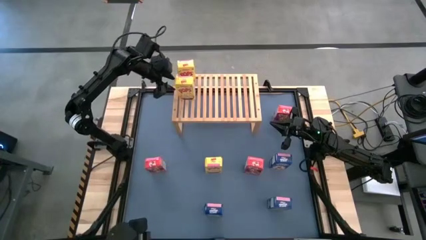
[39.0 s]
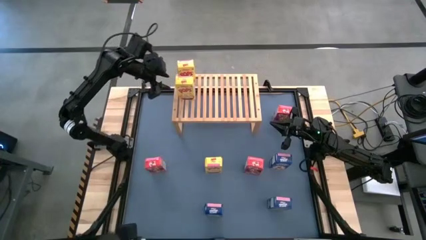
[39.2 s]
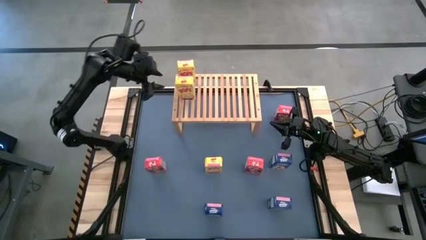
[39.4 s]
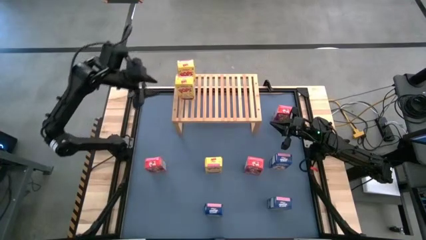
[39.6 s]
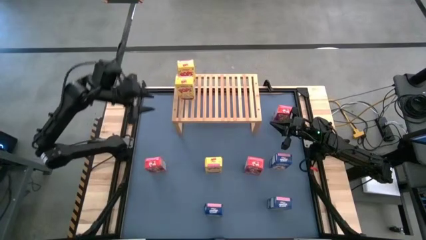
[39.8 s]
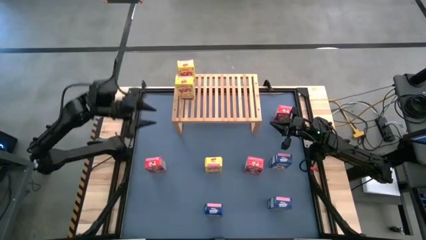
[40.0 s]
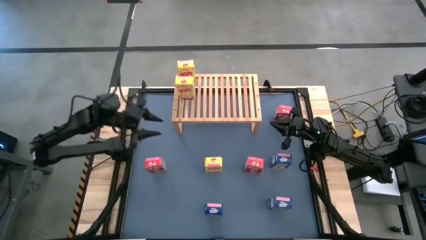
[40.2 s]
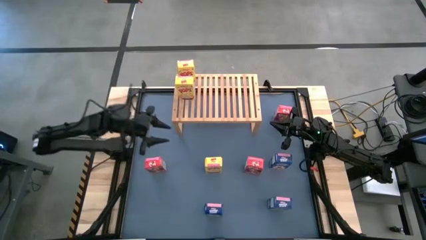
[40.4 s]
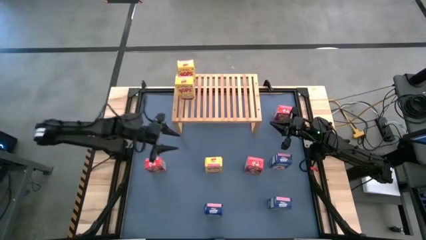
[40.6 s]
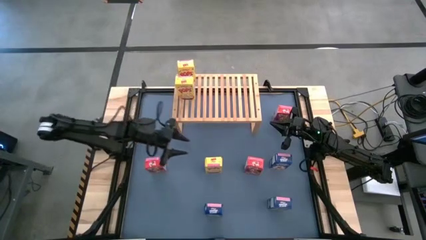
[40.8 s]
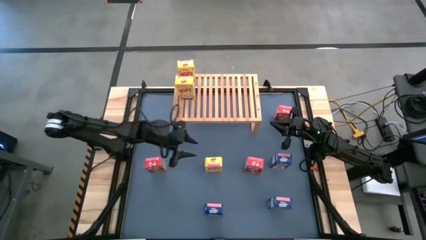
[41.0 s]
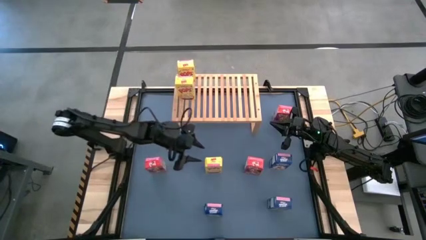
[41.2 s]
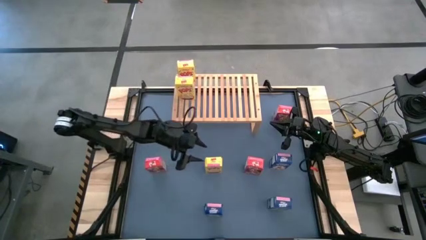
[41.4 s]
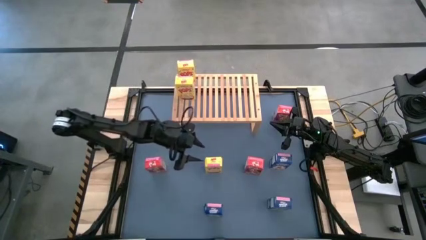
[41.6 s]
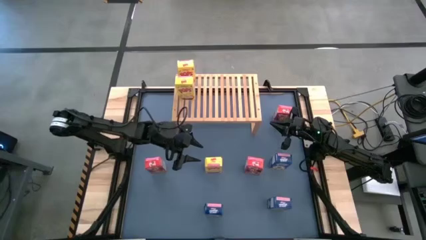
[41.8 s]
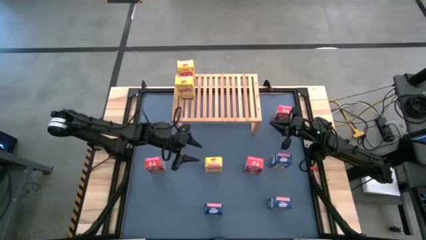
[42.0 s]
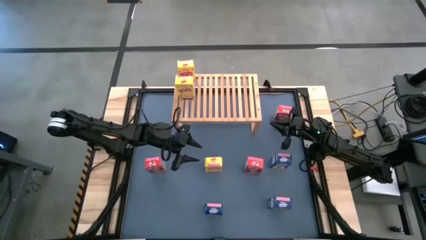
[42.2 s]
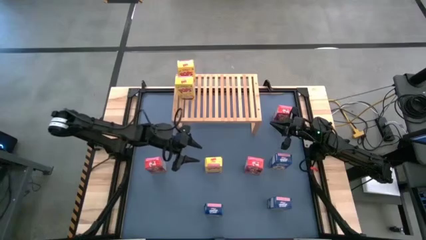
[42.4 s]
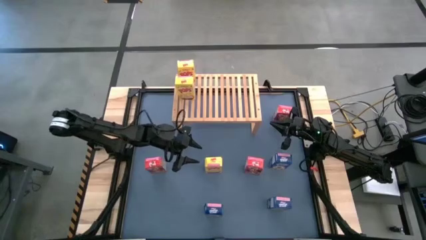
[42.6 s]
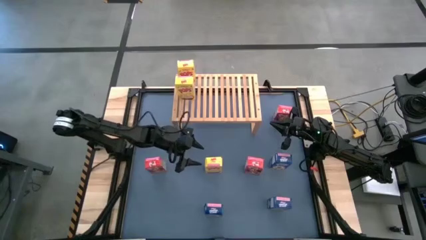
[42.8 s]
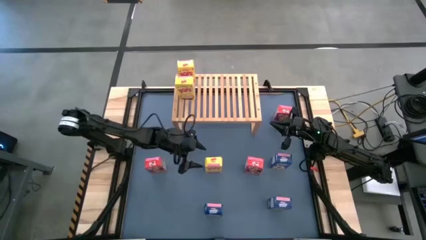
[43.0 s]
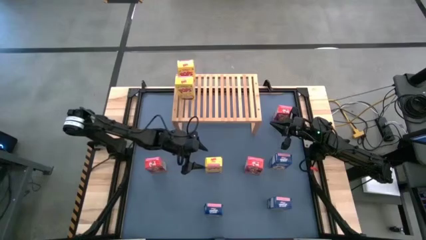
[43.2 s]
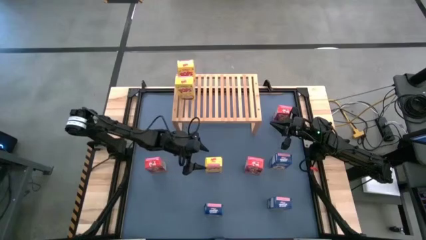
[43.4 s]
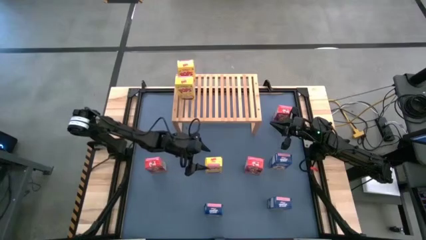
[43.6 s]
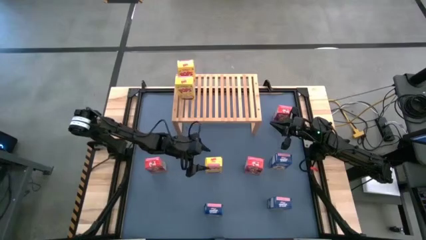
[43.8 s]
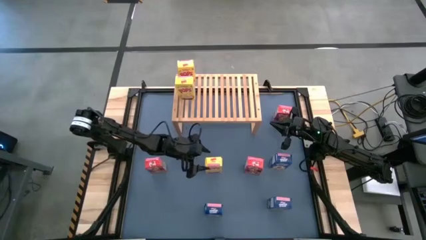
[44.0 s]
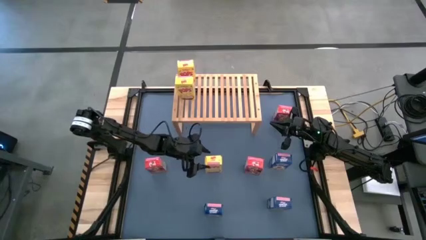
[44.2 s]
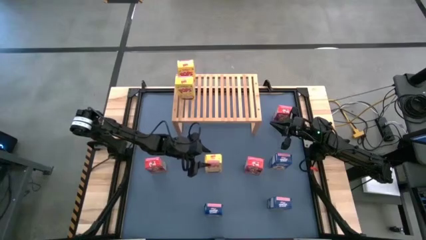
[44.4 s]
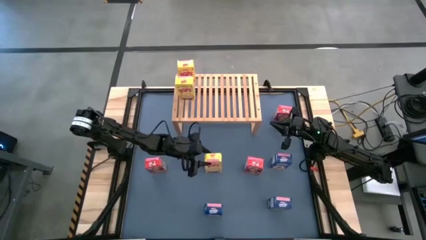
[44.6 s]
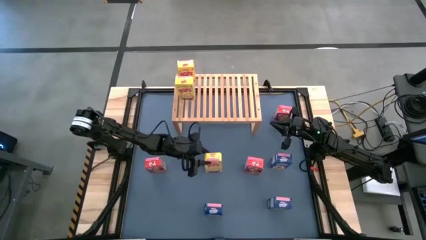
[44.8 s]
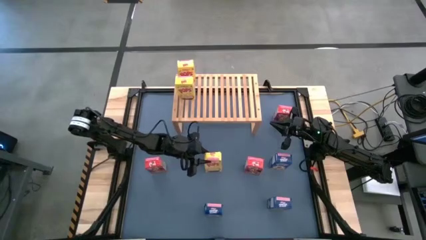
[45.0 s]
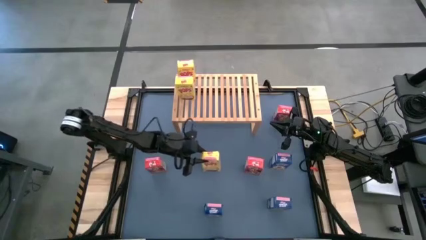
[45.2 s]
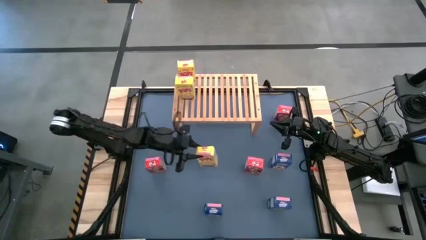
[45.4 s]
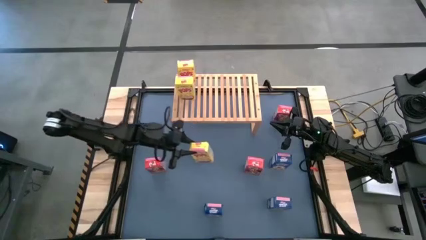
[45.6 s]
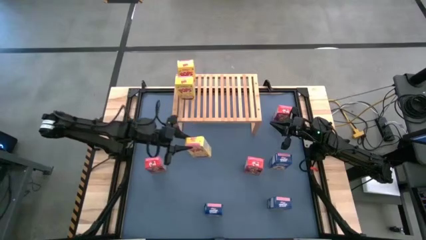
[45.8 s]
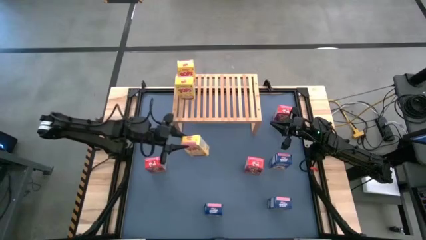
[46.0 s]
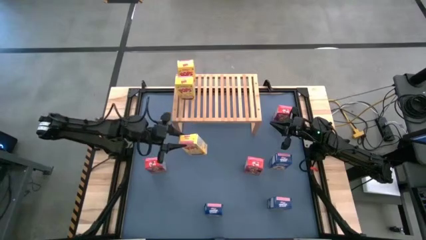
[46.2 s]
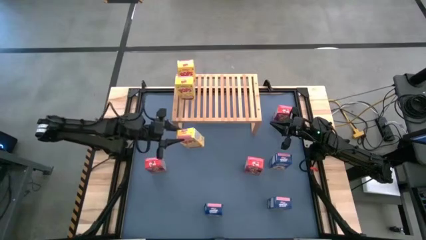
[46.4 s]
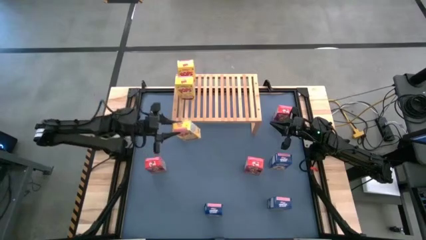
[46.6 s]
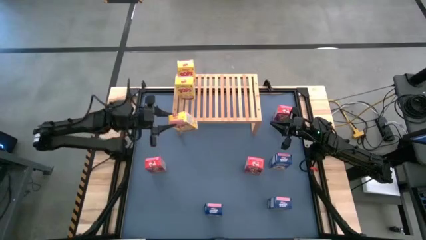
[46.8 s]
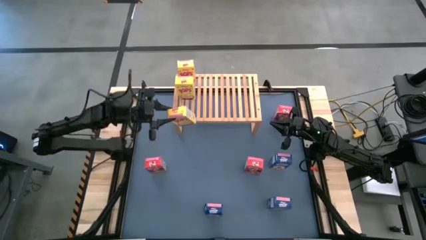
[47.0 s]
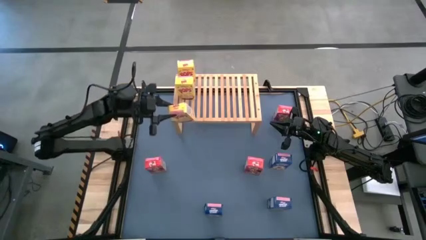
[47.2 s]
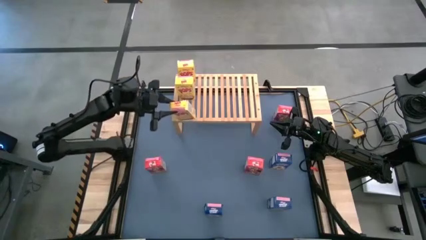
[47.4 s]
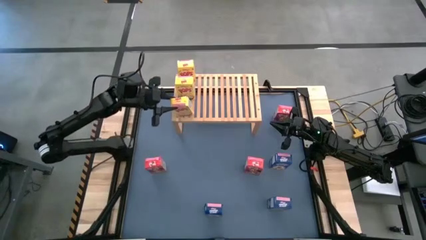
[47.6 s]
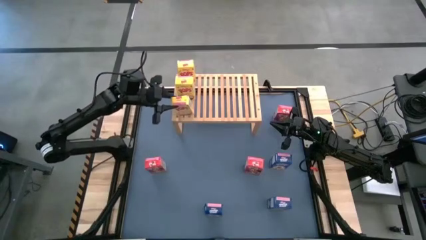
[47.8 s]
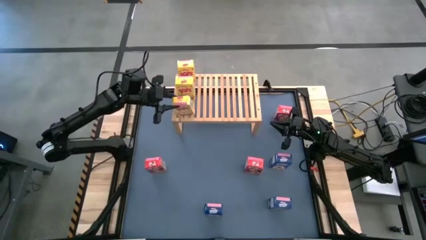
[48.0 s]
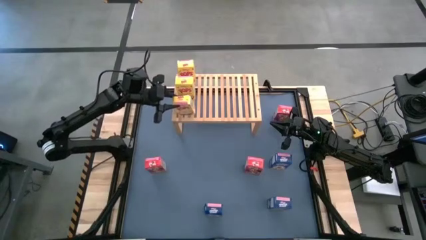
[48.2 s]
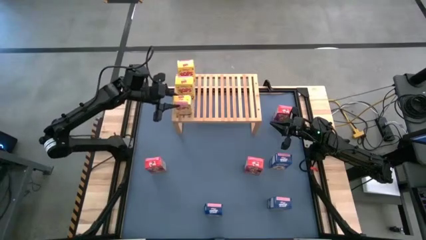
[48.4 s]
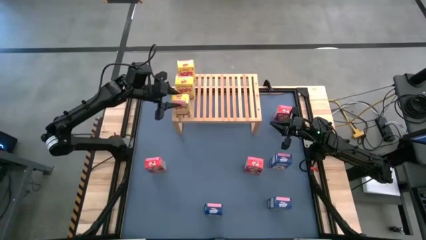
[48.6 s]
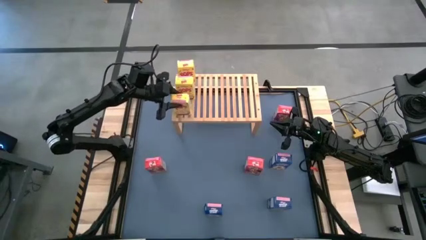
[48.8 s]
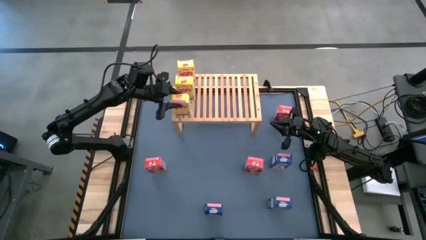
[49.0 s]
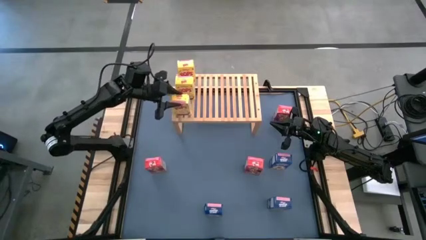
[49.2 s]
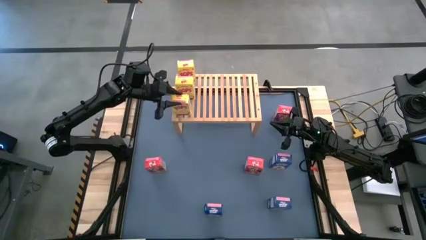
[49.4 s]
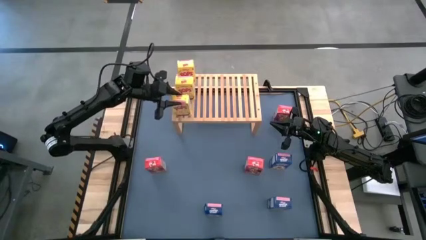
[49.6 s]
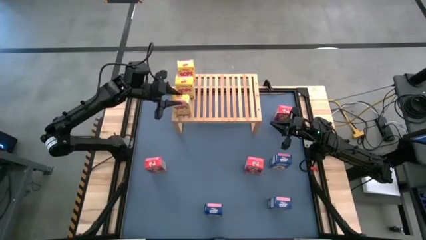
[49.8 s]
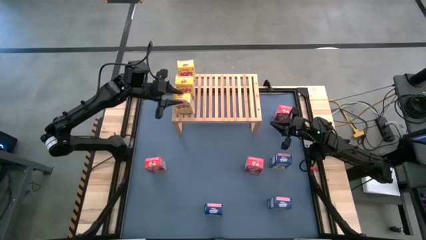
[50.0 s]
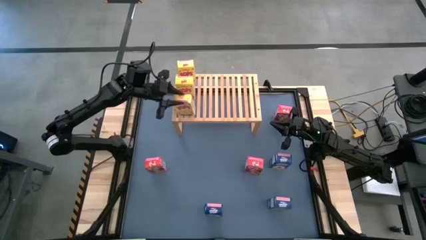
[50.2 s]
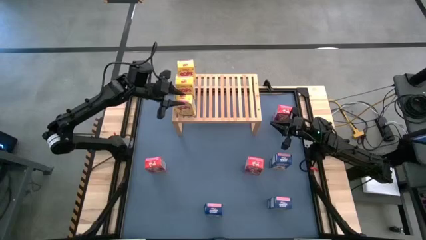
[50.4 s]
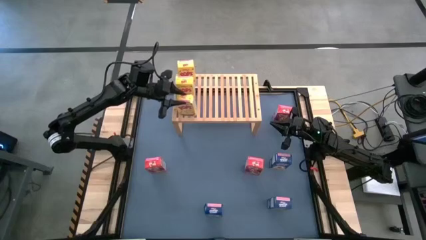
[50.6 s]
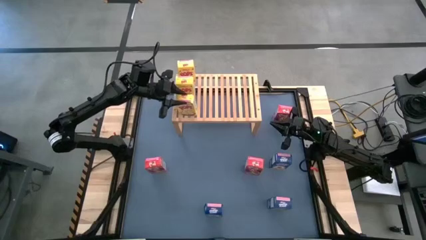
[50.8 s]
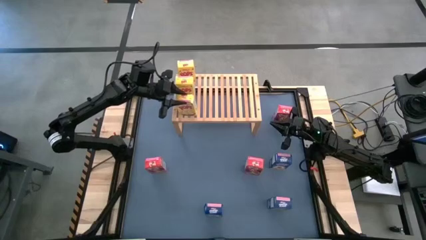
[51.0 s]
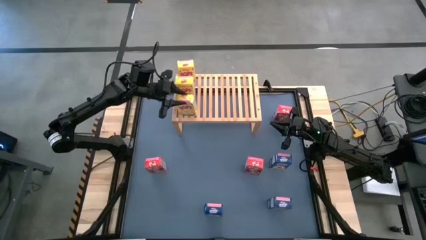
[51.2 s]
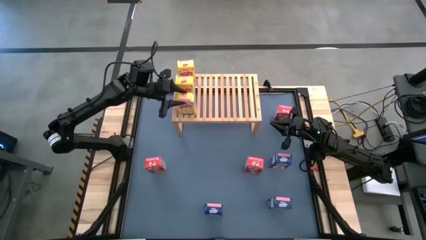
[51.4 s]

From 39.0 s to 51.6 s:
Task: Stack cereal on shelf
Put the yellow cereal box on the shelf aligned with the other yellow cereal boxes

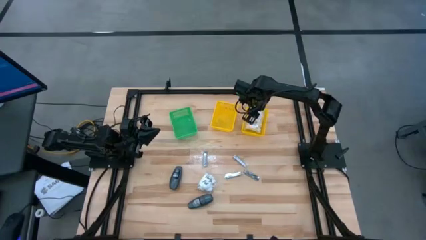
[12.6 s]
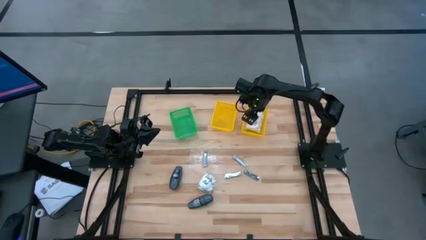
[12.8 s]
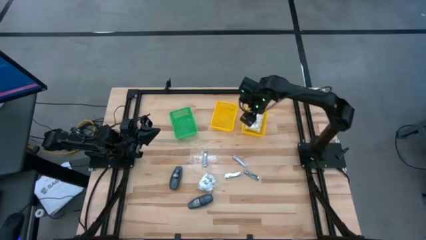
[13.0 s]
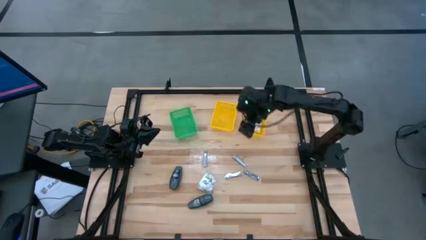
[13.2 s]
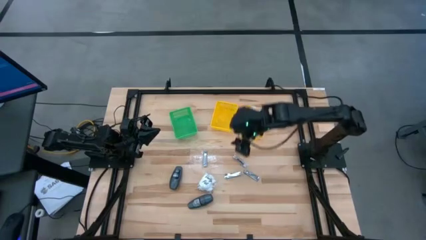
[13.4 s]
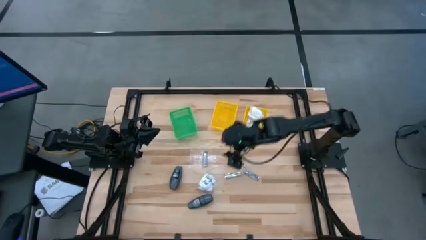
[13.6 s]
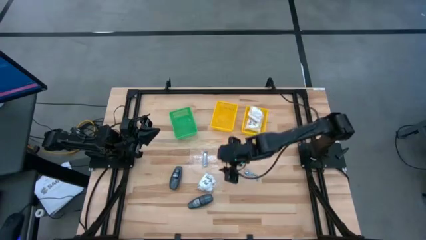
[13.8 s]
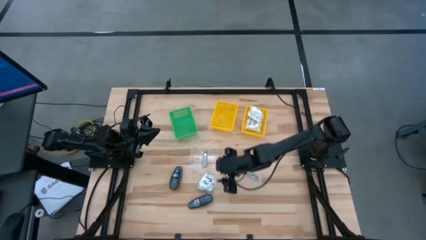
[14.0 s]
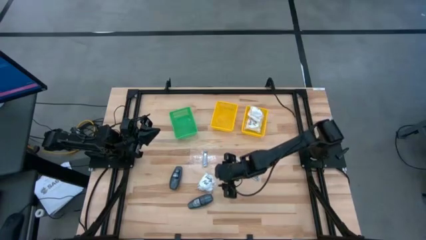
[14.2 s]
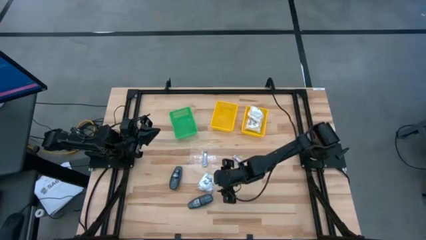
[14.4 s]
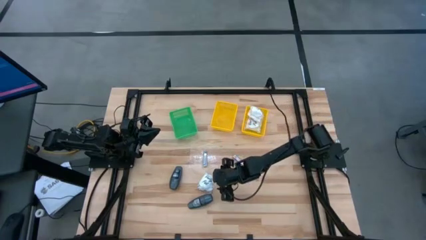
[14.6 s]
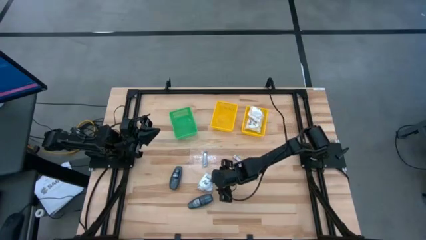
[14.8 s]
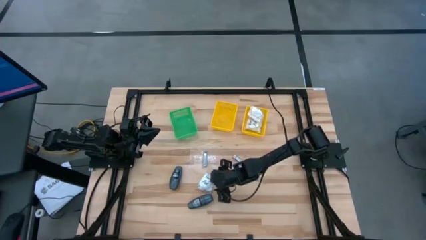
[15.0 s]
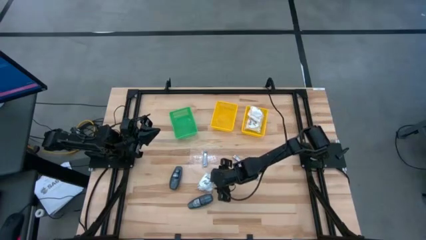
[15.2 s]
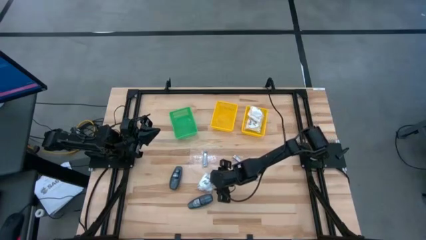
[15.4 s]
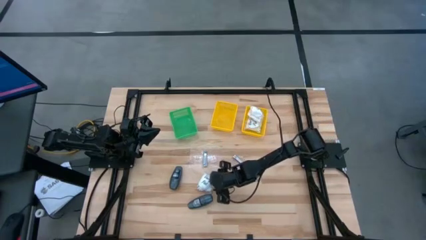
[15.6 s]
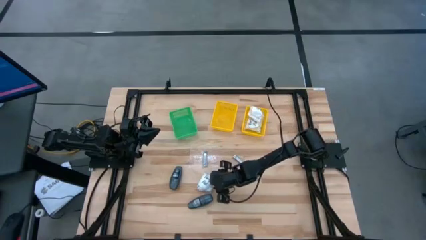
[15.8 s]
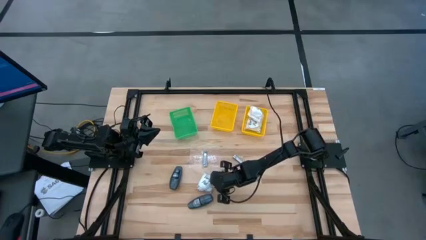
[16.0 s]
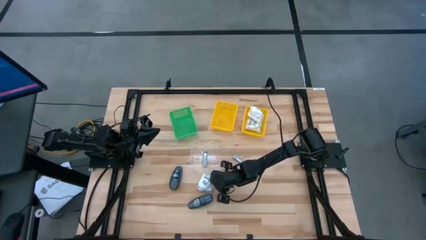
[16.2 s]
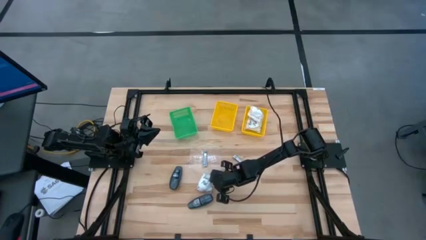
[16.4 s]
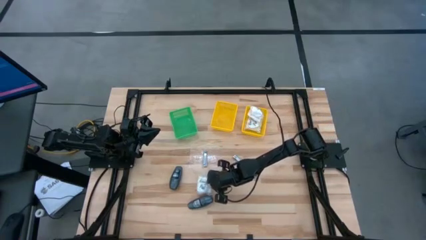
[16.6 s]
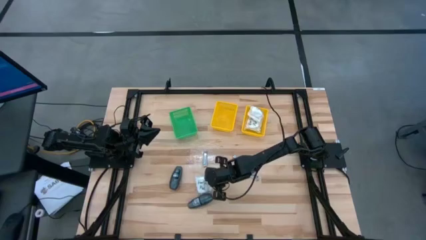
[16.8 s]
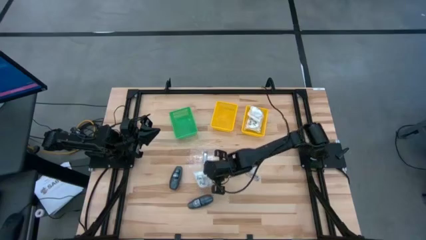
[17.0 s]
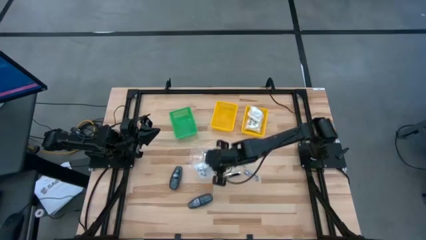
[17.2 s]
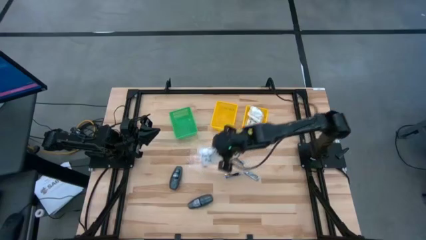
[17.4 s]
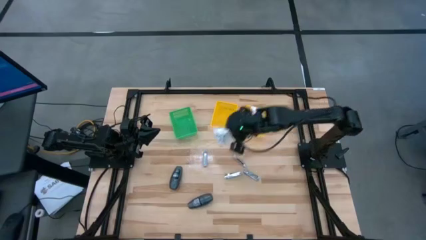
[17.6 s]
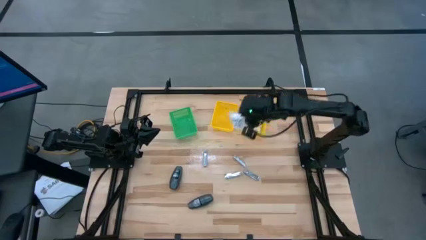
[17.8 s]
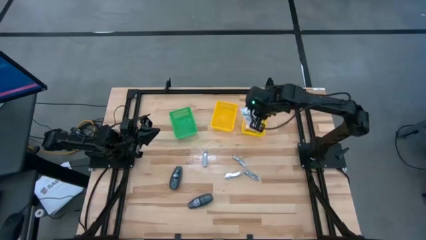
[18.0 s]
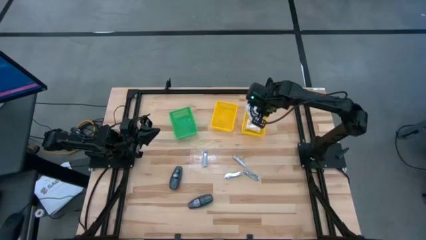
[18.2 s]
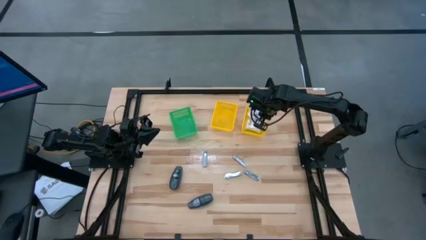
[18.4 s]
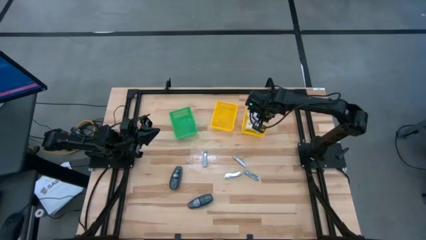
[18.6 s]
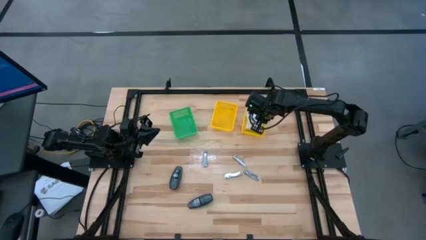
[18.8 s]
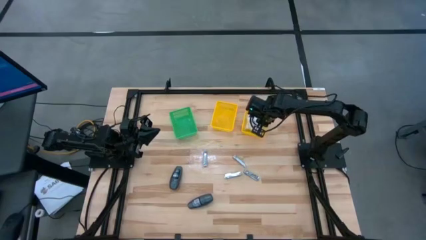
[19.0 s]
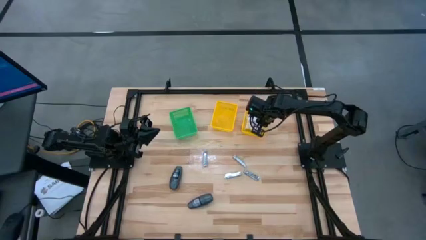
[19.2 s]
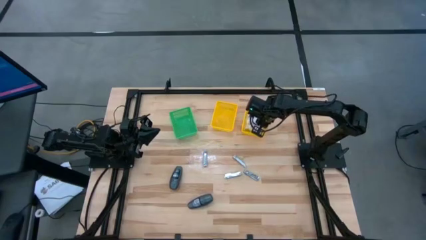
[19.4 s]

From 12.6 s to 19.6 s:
Task: Pick & Place Travel size toiletries
Put the white cotton pack into the right yellow bin
